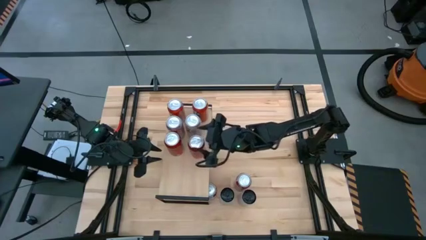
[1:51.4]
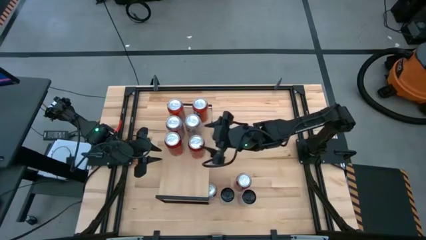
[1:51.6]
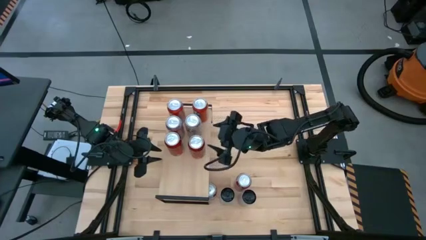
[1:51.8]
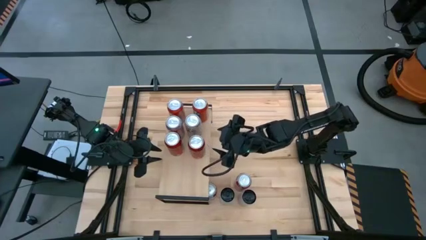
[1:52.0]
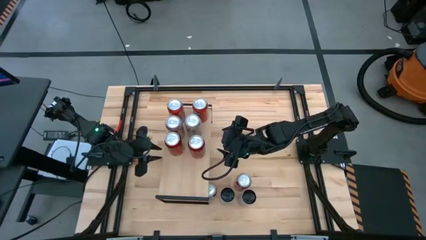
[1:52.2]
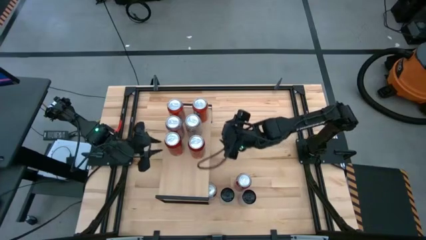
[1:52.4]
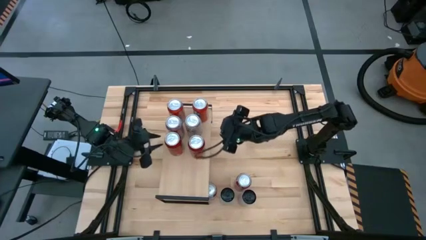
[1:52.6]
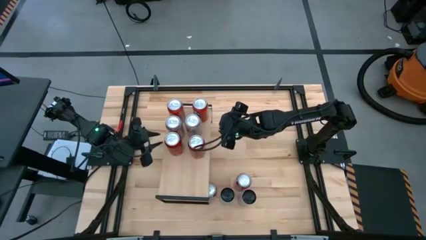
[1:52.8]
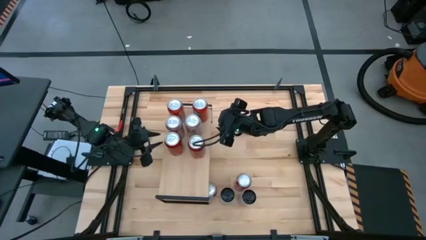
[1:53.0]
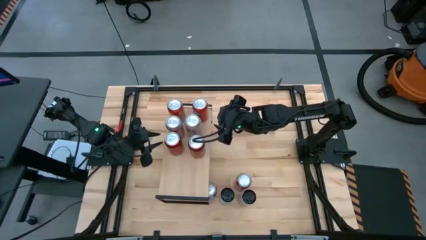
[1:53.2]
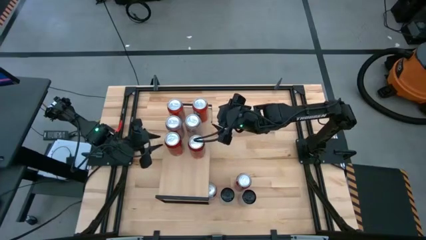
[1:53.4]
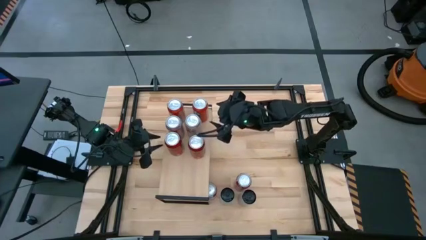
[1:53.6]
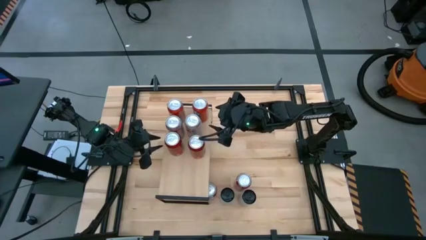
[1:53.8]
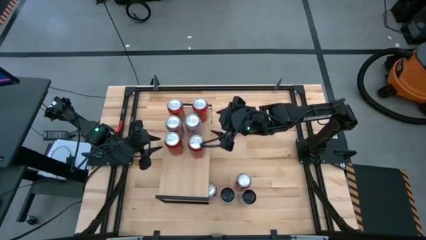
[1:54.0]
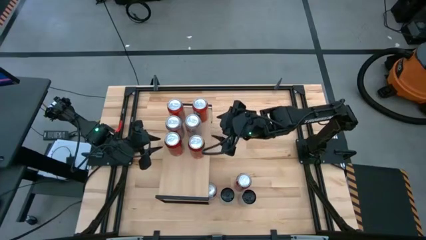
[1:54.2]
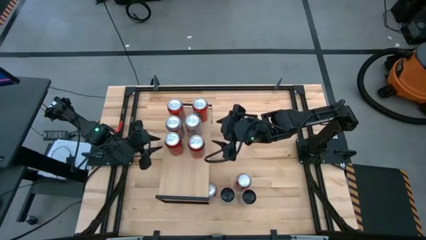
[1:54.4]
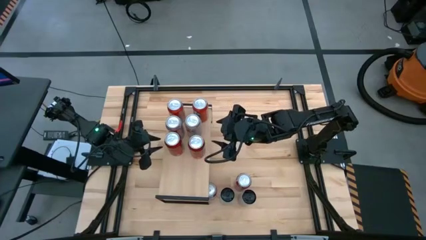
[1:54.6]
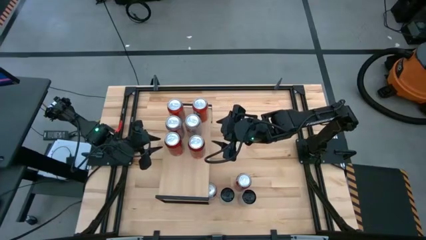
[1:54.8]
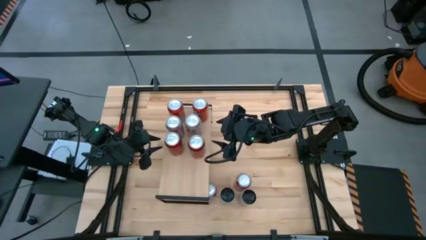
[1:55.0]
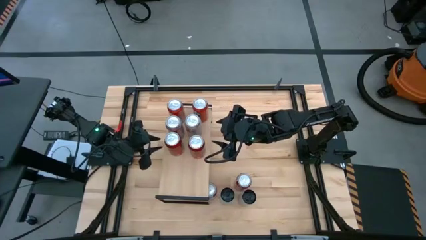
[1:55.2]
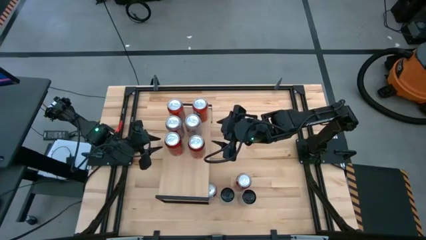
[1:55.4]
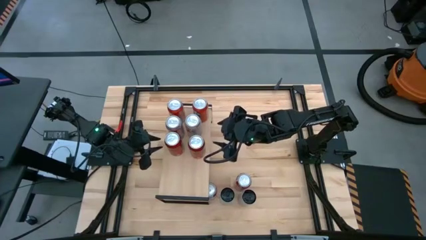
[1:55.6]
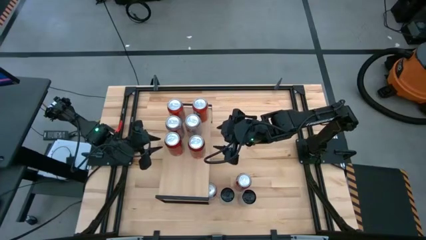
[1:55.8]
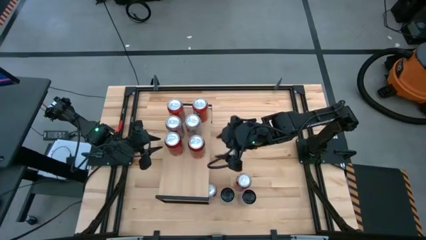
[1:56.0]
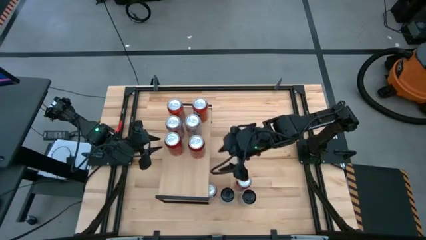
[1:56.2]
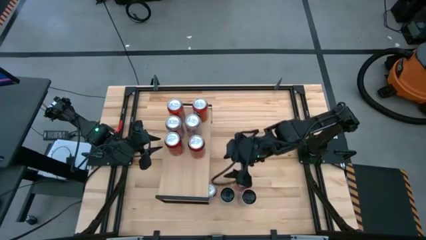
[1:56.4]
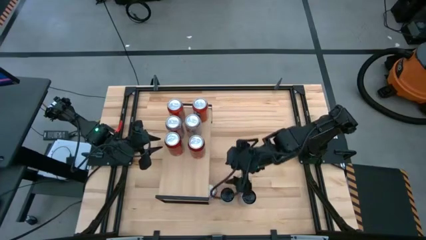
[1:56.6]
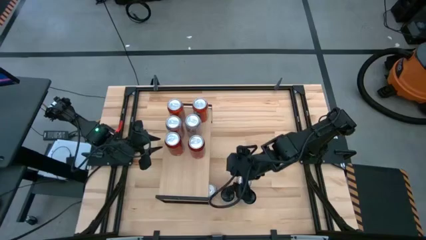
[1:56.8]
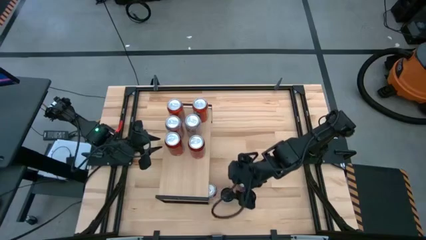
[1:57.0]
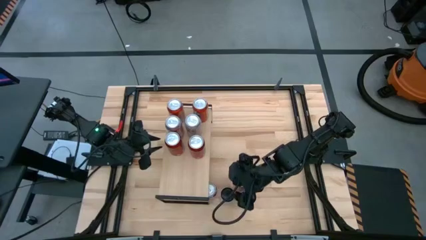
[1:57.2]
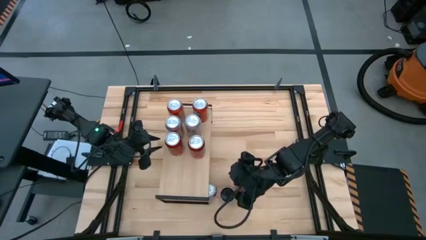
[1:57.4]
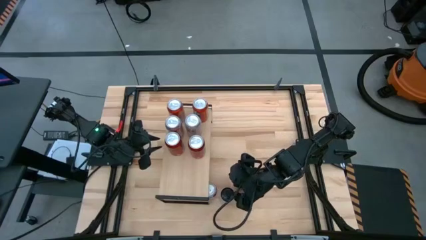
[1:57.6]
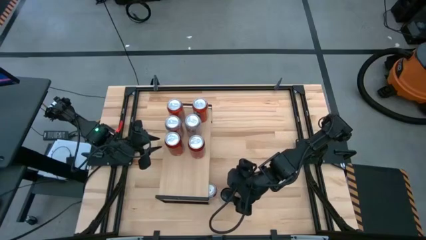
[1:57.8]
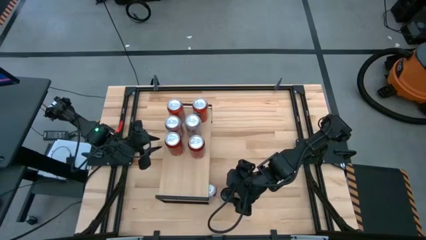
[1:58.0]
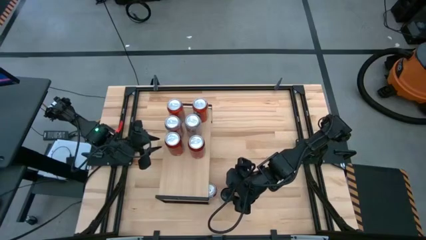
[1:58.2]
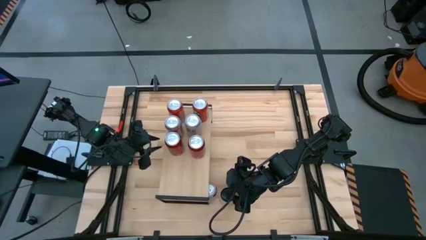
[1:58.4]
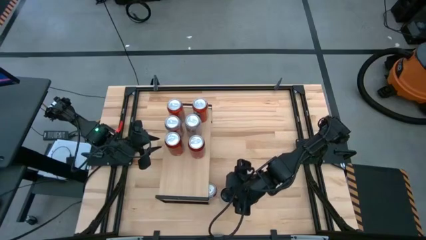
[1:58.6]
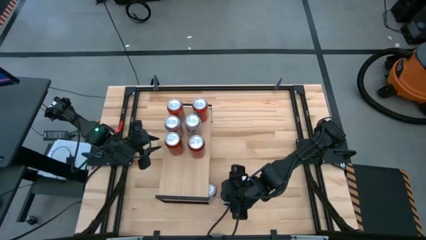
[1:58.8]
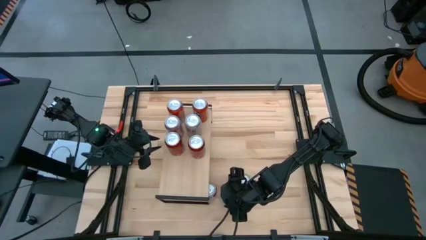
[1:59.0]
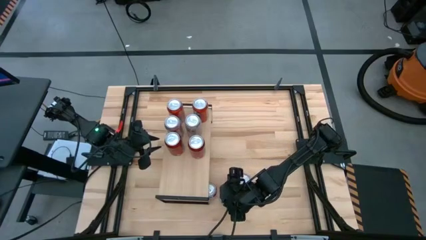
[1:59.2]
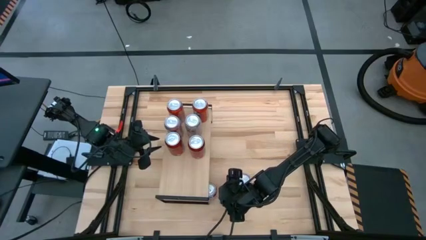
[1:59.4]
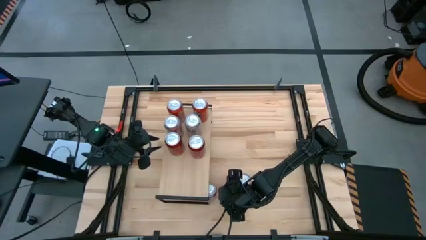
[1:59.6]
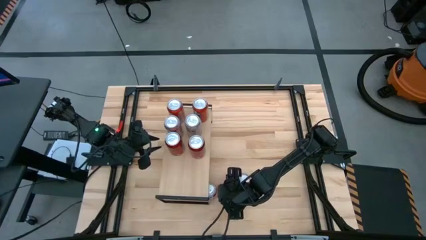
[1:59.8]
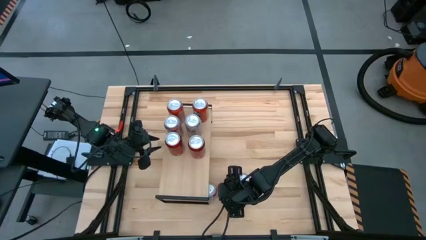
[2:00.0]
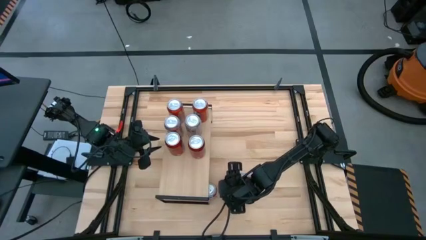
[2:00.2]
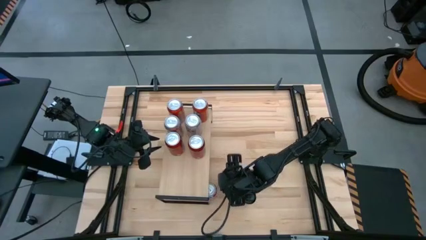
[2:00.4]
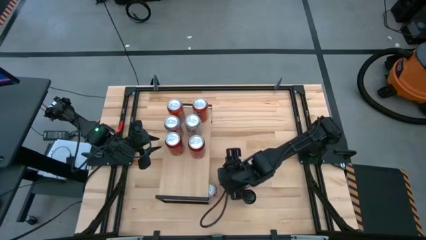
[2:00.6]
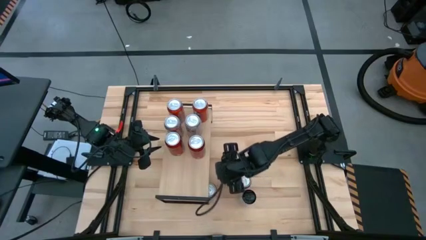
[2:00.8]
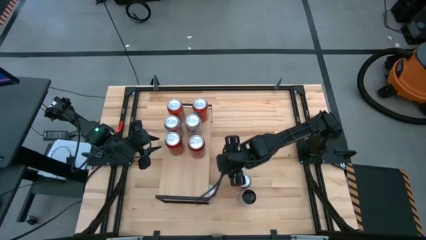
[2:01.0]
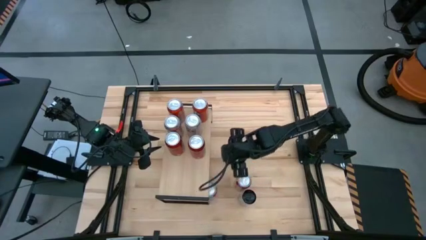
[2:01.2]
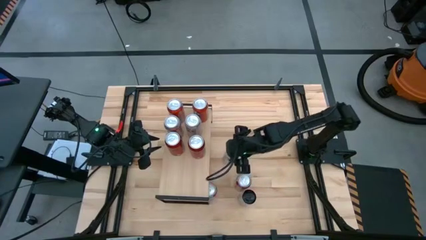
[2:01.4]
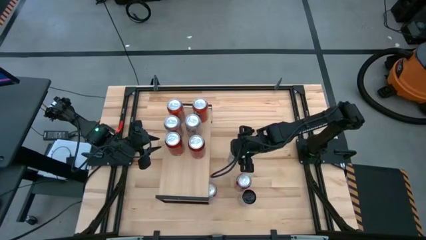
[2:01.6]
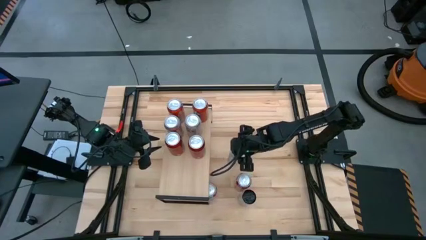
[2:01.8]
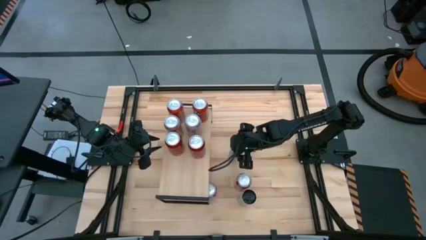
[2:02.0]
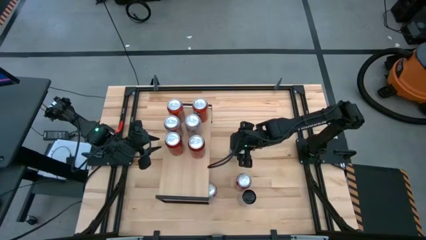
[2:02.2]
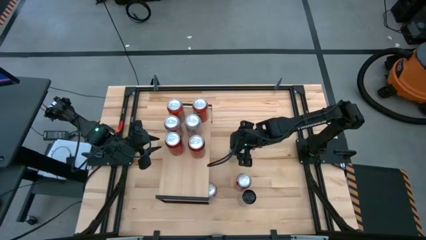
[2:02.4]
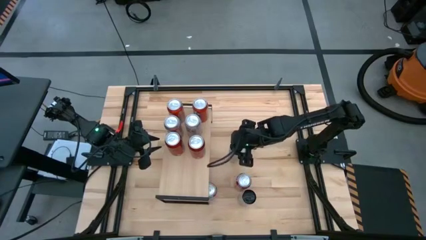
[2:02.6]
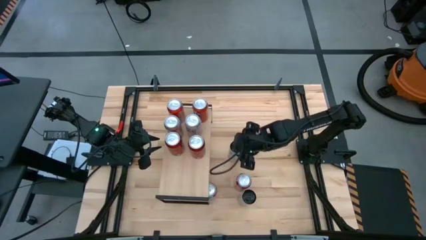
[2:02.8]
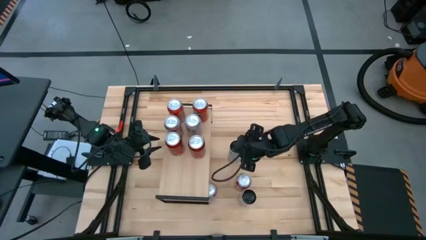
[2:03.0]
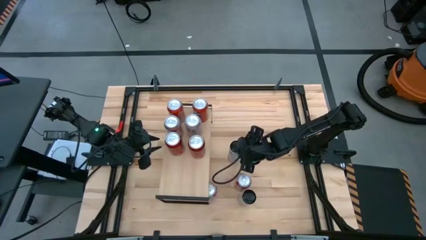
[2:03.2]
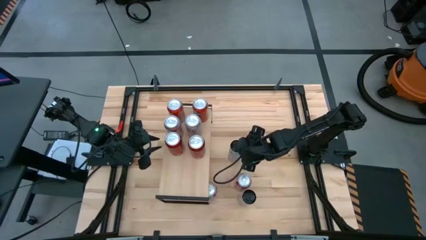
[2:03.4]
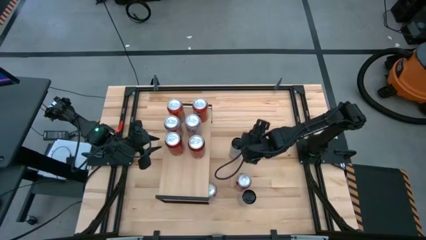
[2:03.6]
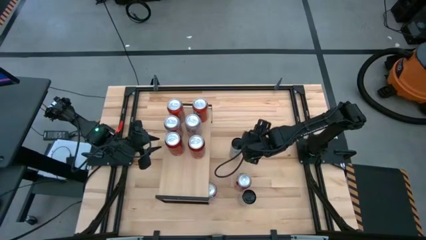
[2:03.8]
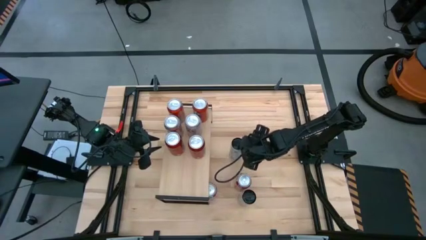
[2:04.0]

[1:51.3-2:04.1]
Task: Place canned beverage on shelf
Put the left white yellow soda can on the shelf

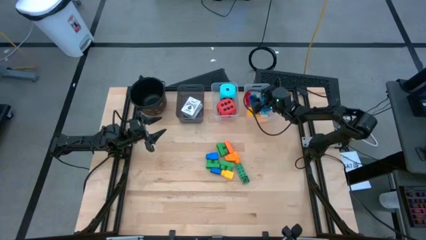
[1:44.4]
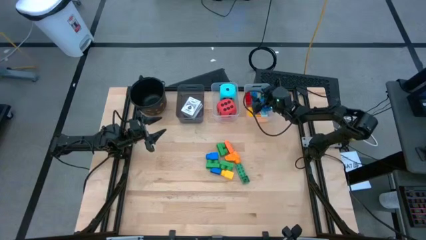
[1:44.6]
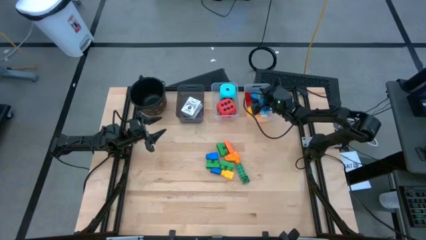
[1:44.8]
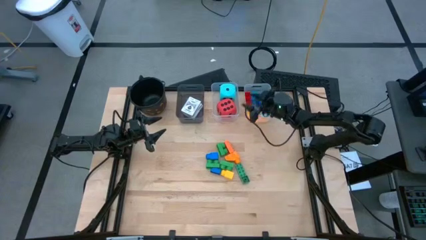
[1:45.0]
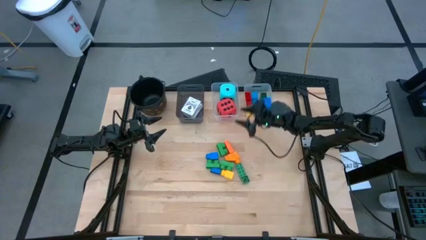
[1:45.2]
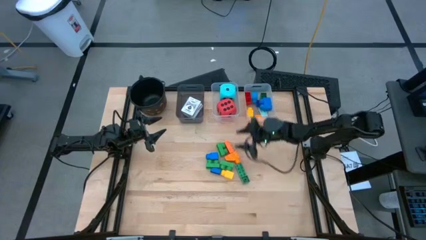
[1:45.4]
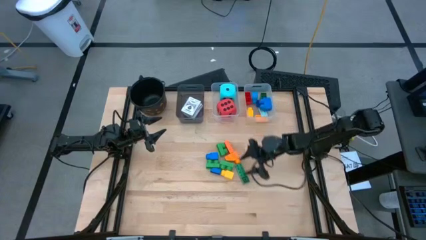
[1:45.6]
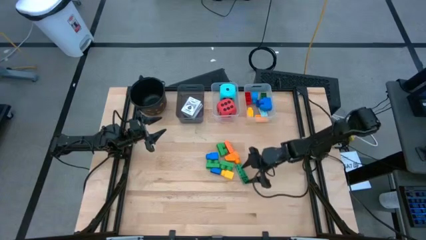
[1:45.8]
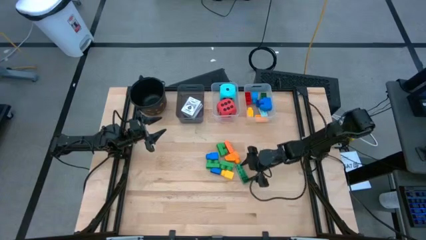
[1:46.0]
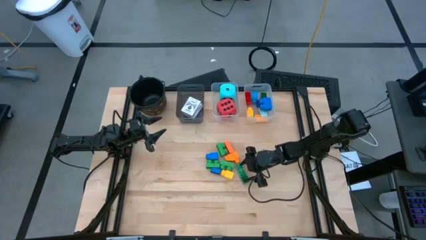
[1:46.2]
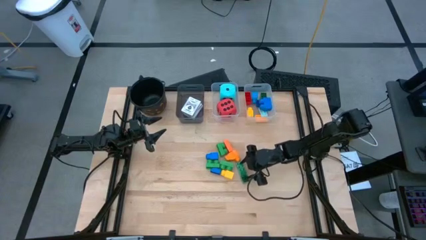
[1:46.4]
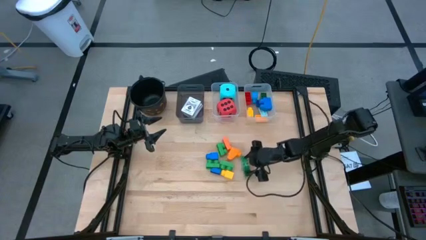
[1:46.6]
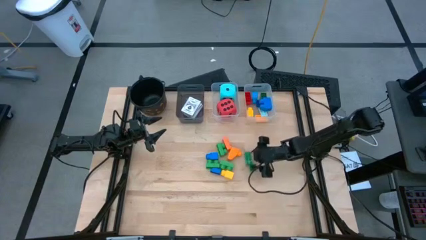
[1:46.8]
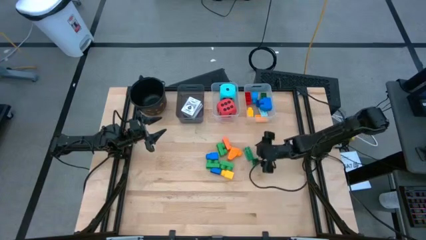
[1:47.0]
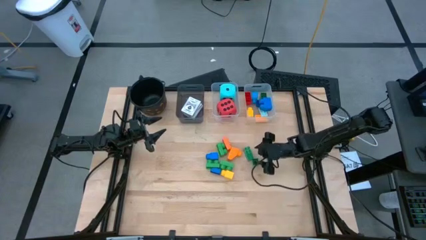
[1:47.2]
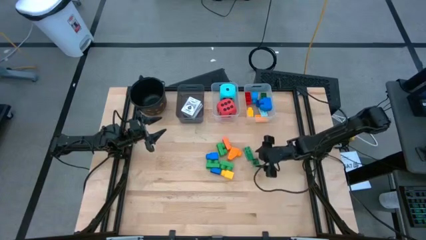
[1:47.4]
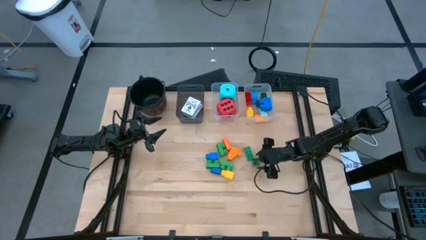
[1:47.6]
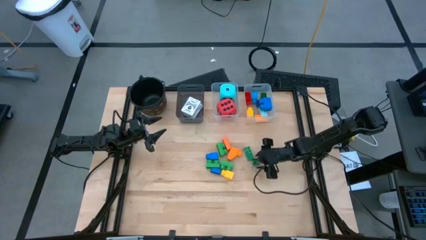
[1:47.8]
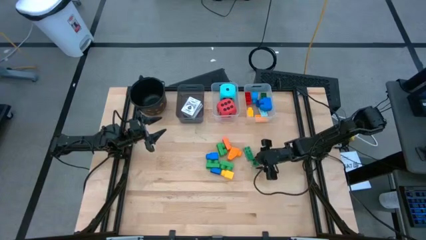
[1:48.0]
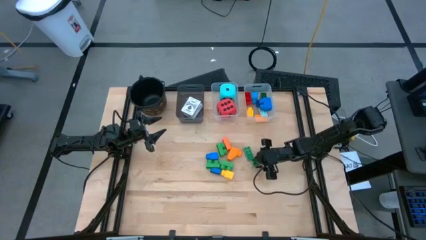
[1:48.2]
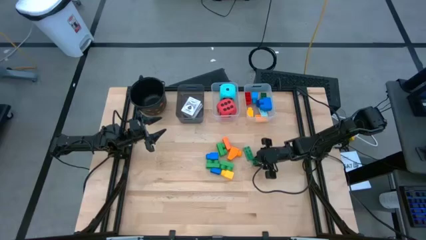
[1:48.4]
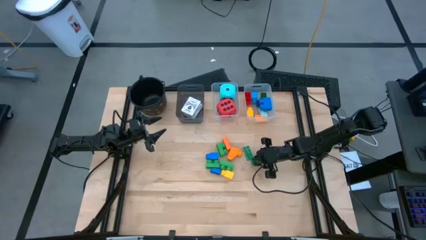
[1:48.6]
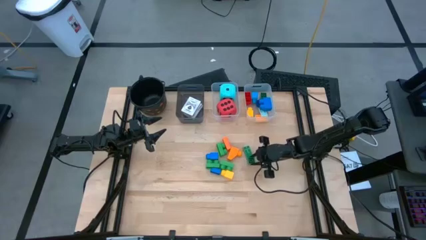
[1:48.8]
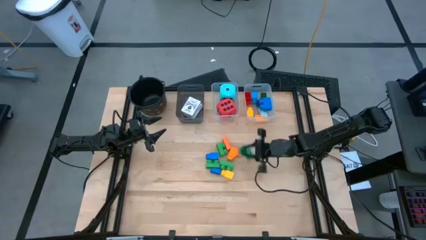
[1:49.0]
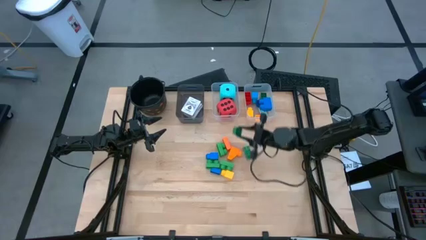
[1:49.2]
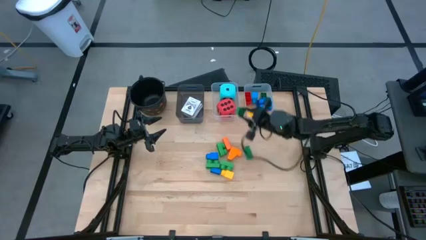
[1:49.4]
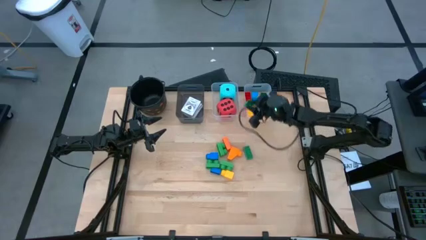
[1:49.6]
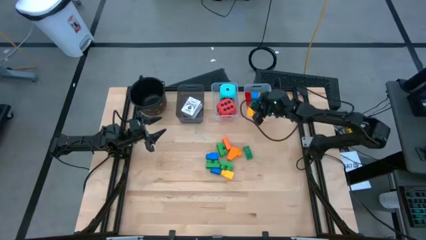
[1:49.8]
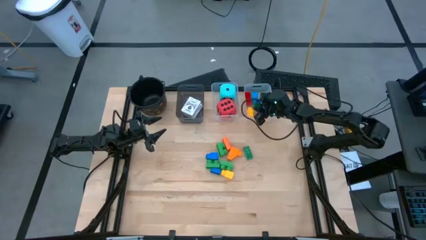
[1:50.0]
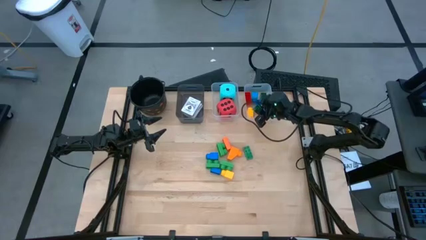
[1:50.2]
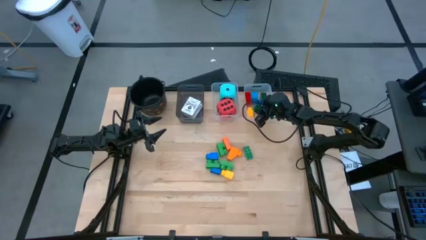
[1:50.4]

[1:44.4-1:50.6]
Task: Pick & Place Toys
Put the green block into the right transparent bin
